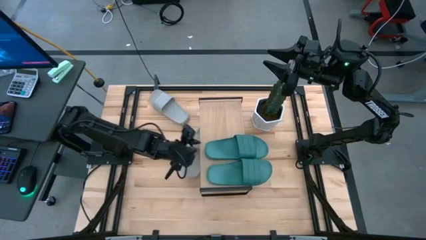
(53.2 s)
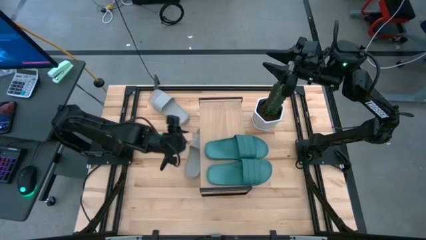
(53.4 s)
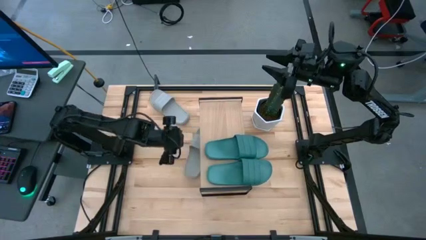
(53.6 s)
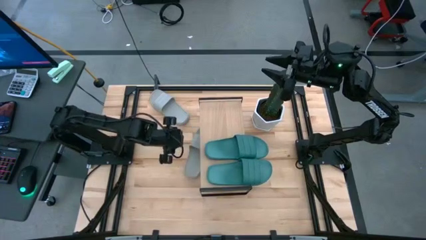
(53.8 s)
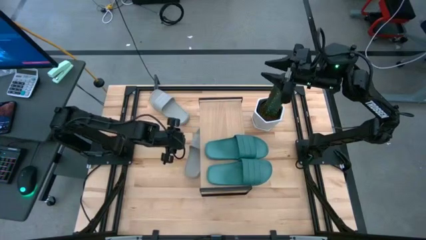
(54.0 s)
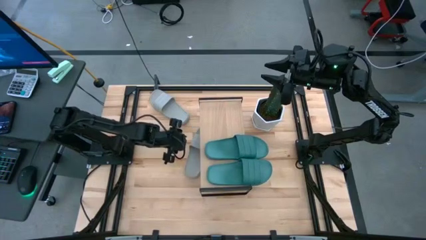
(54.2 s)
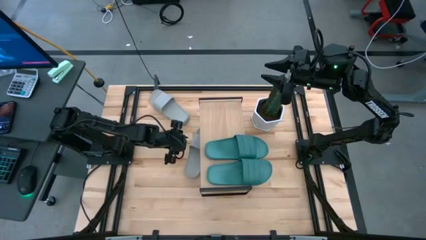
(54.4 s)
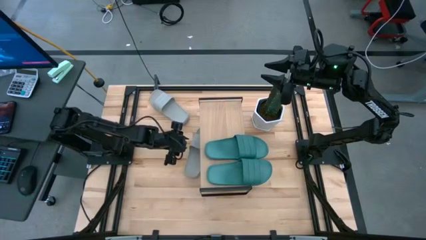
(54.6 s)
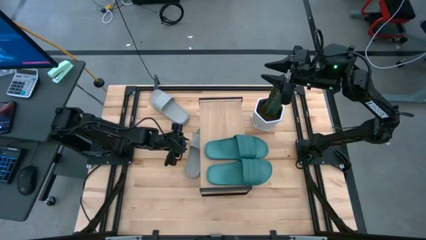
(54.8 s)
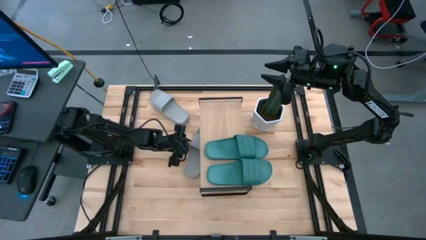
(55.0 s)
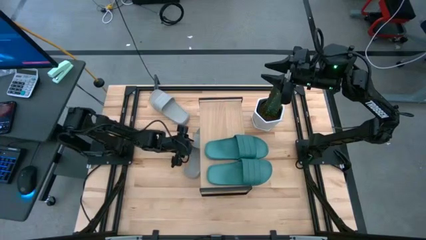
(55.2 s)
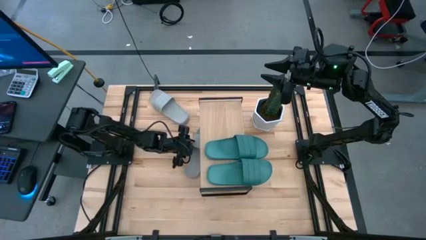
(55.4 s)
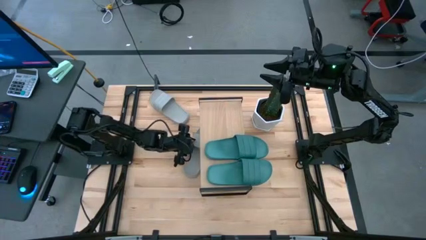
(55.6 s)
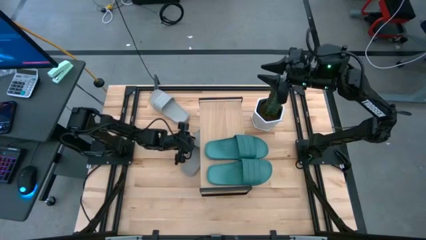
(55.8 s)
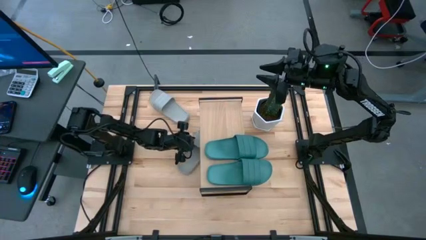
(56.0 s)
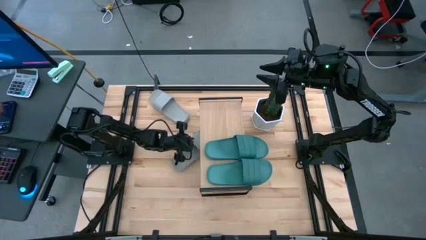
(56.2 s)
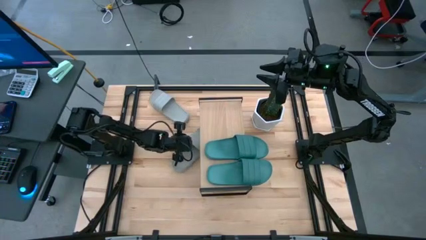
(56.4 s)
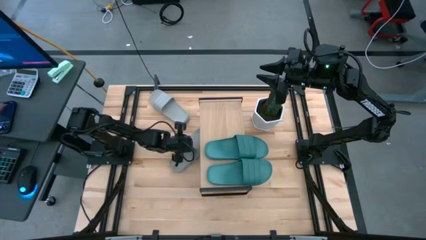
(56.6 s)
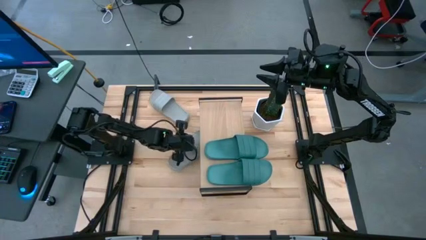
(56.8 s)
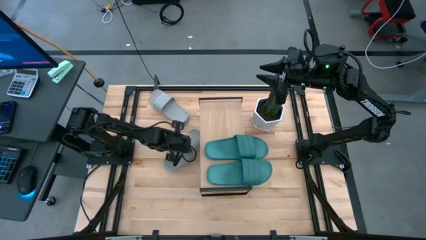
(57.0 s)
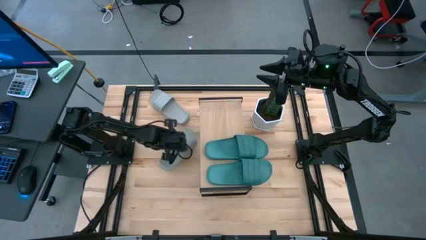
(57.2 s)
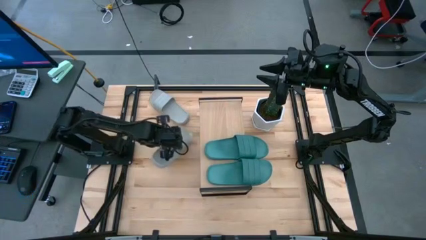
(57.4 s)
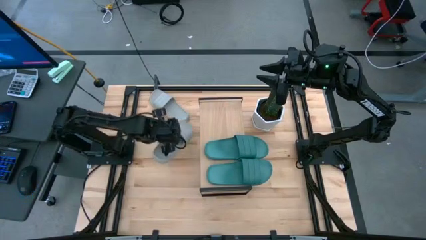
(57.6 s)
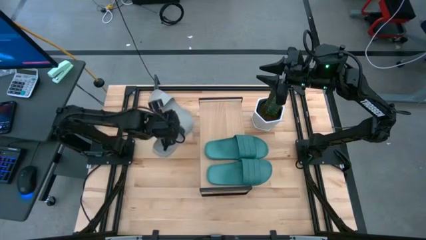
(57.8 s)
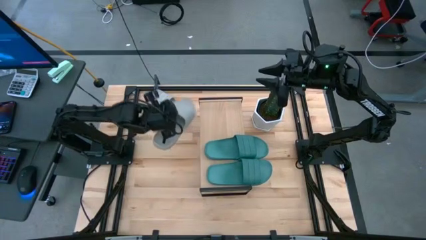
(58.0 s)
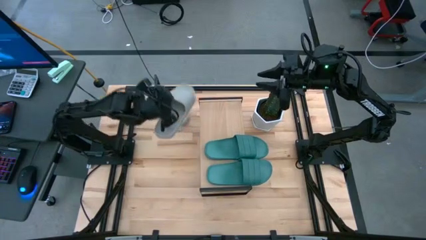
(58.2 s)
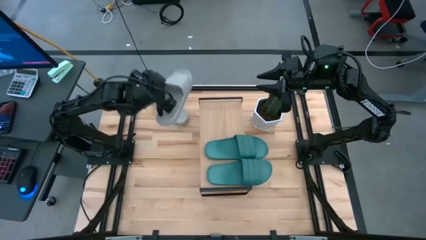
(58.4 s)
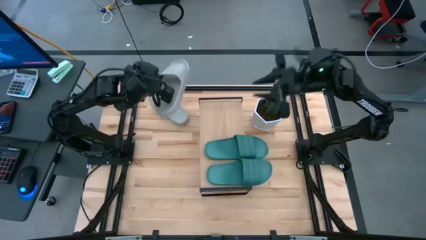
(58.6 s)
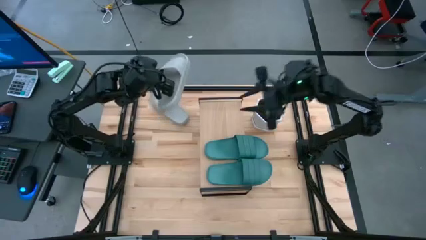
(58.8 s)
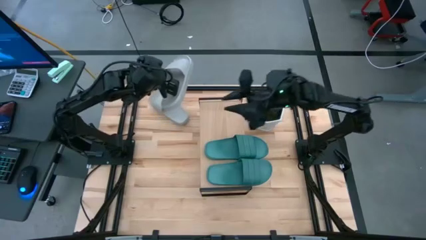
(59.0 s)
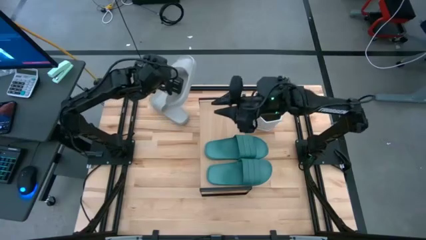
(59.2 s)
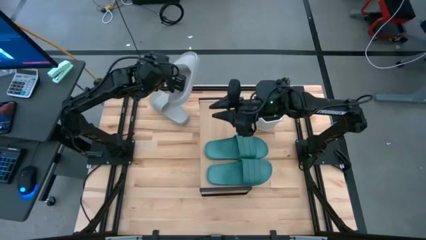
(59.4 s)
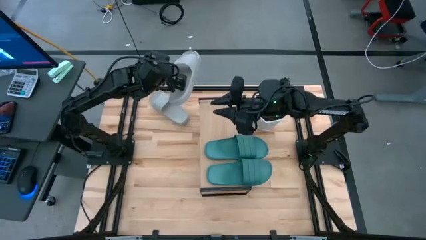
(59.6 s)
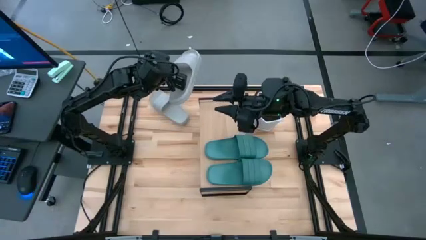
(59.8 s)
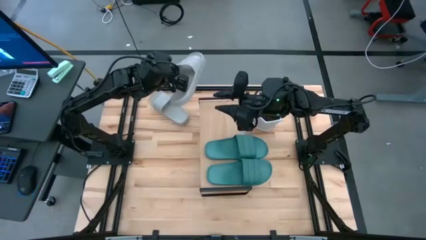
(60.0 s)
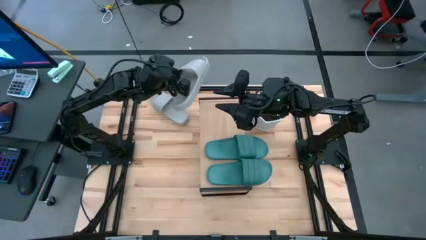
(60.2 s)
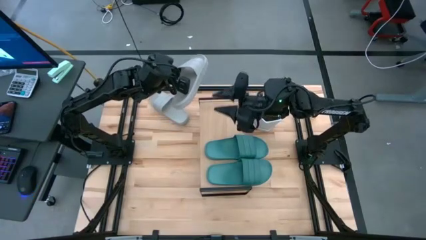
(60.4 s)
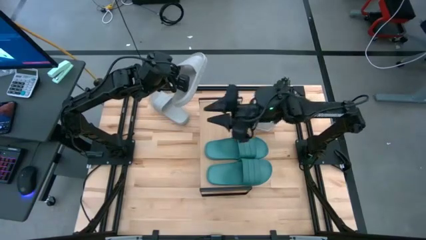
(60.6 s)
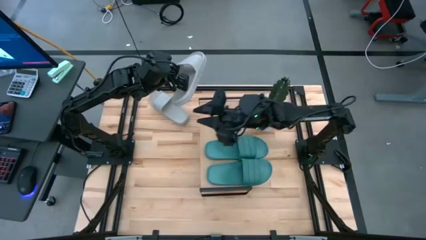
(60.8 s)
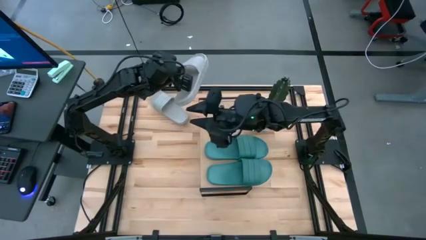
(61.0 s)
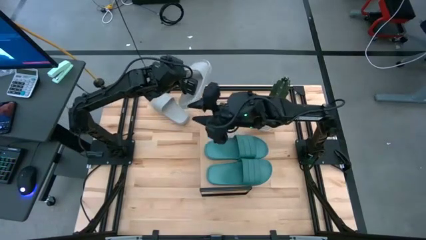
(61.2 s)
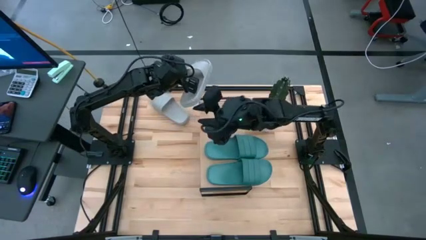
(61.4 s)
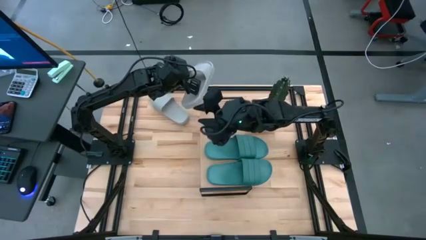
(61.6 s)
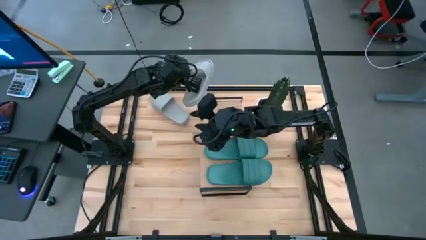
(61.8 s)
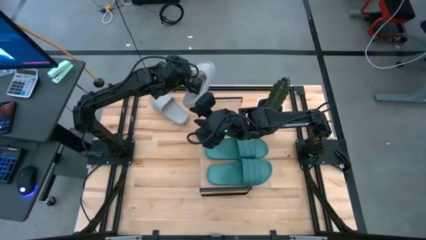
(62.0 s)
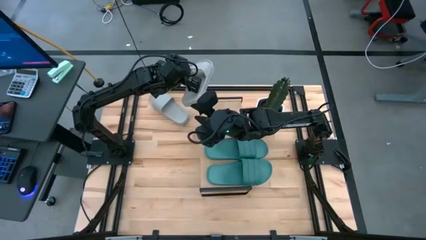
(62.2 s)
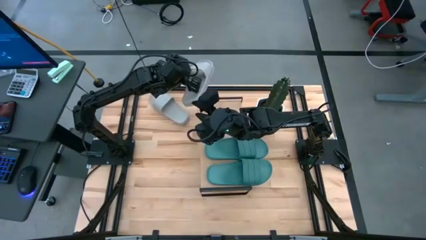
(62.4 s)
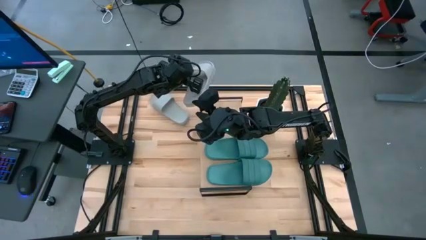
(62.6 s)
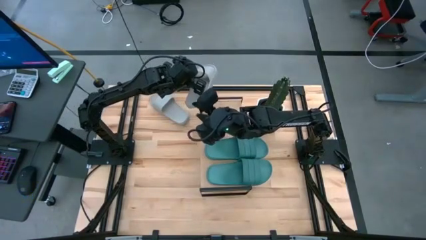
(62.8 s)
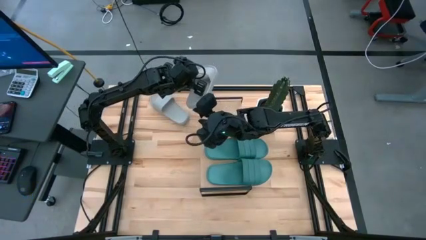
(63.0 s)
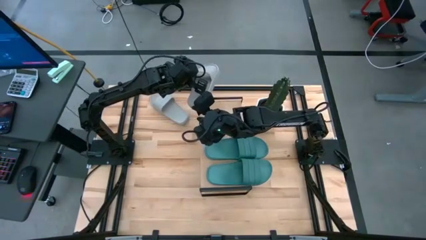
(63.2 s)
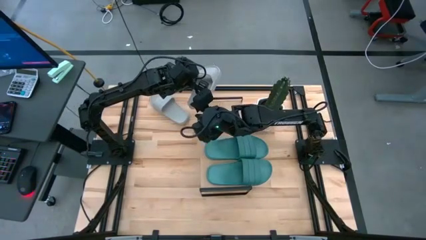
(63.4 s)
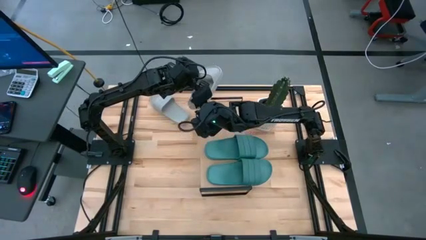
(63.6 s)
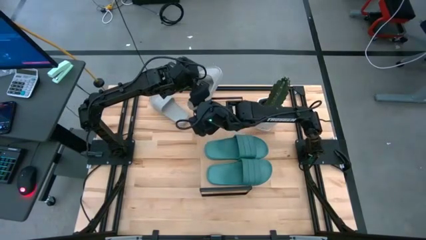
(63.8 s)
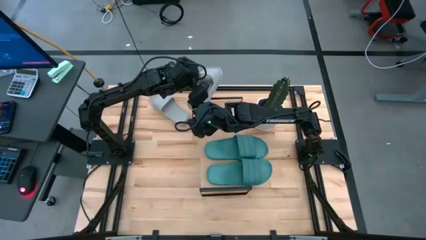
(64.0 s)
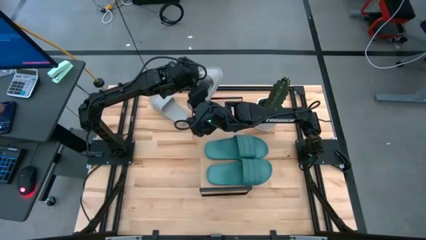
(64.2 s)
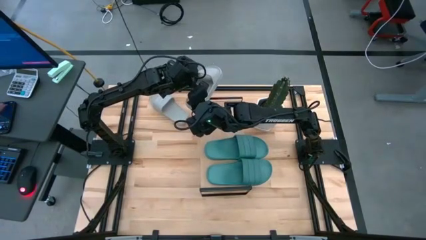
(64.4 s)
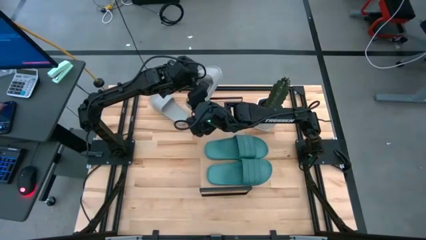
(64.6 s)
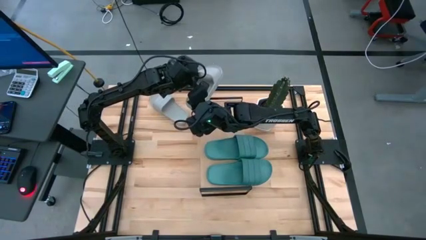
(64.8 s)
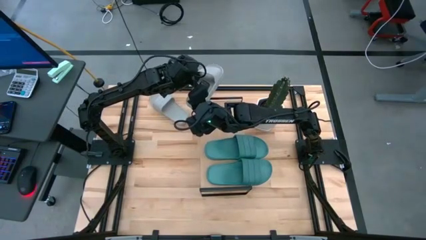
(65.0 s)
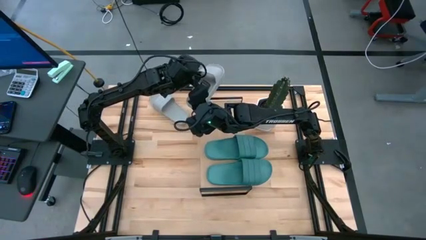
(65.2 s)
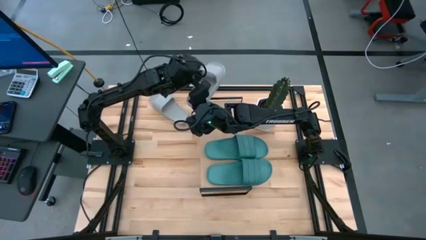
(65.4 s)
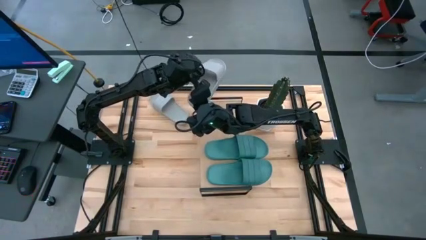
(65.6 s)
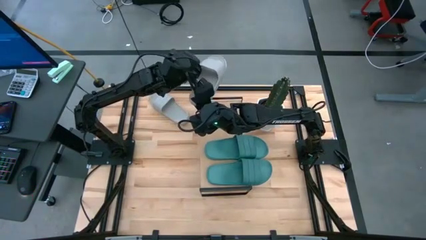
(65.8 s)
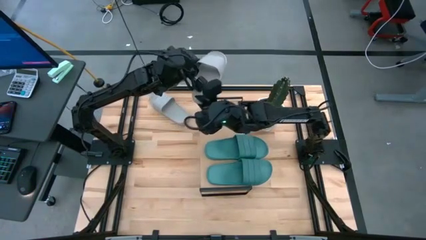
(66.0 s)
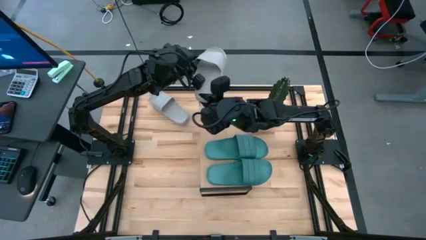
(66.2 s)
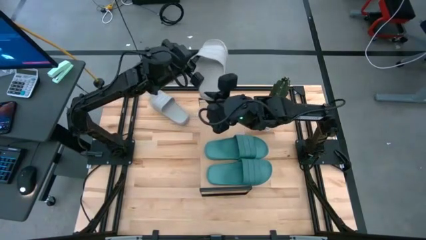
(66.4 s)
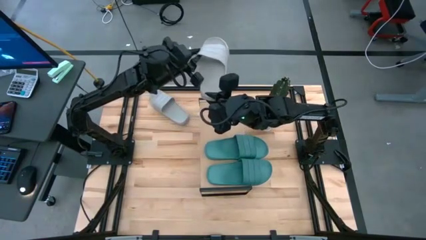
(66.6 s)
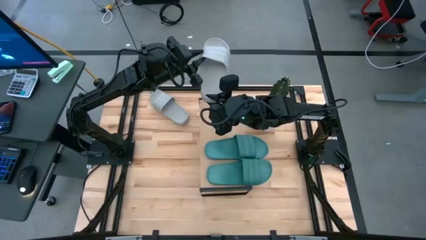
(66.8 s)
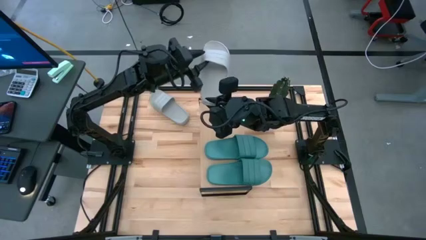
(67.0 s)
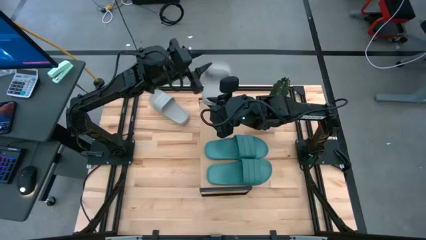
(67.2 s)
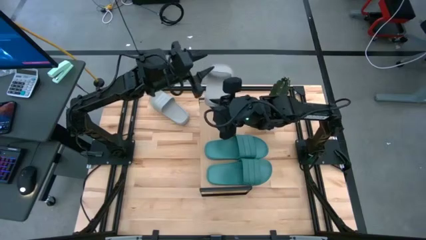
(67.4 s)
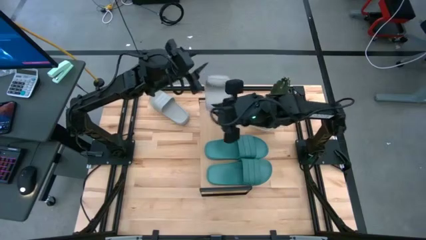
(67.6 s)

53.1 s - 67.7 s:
Task: Pick and place slides into the shelf
Put the bottom gray slide on the shelf
